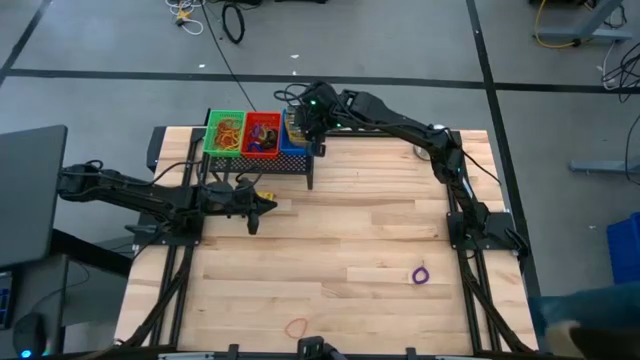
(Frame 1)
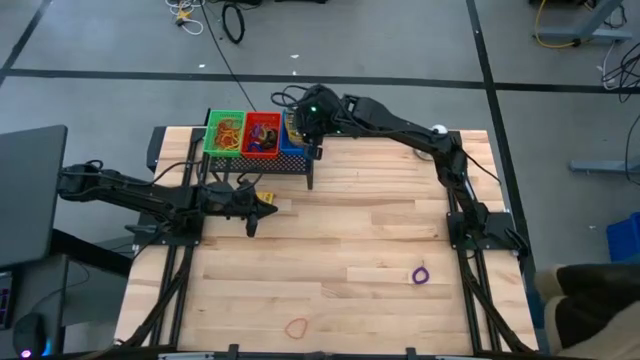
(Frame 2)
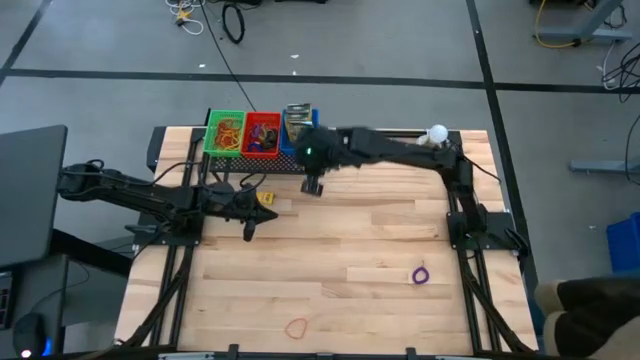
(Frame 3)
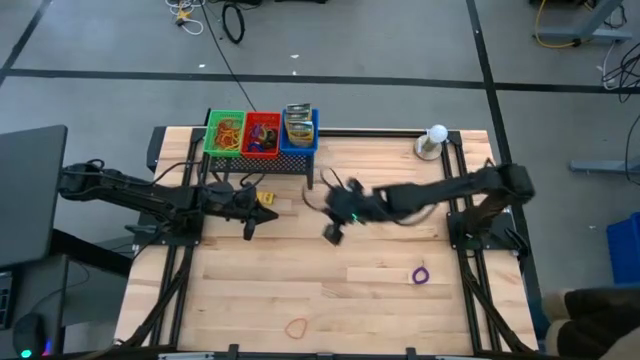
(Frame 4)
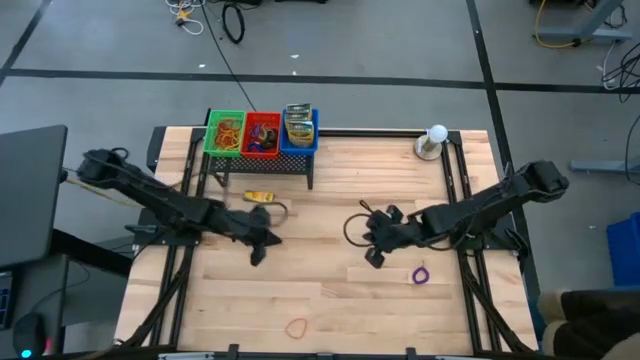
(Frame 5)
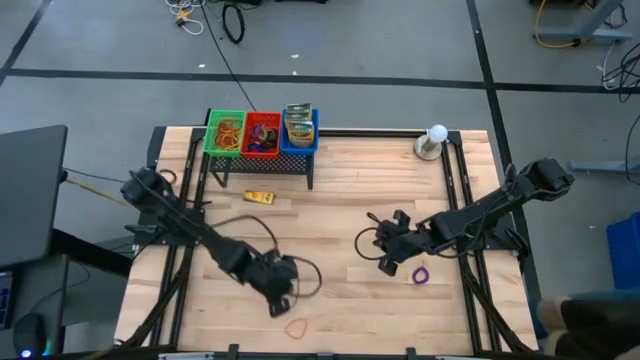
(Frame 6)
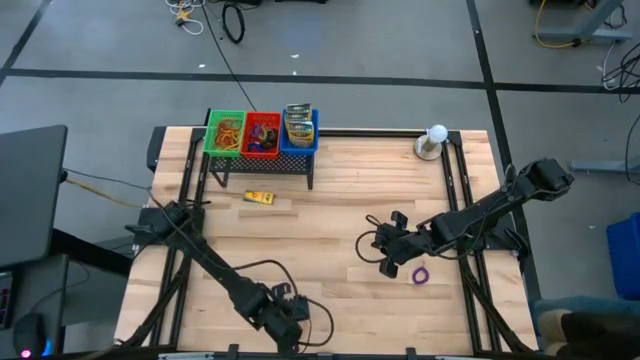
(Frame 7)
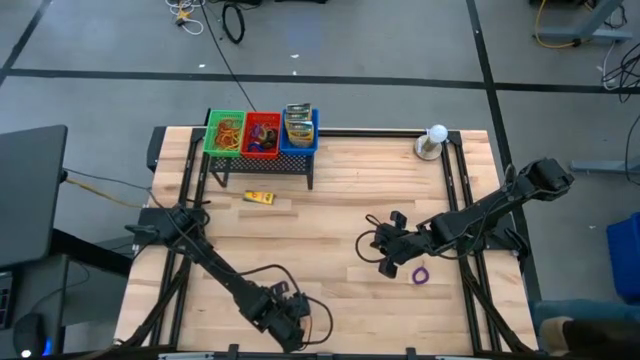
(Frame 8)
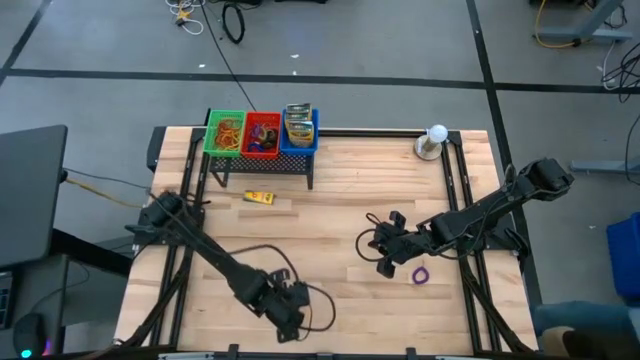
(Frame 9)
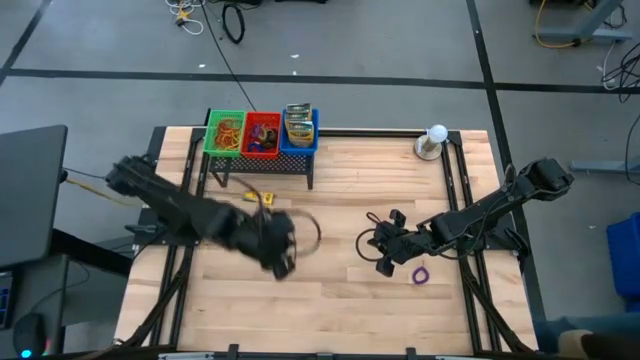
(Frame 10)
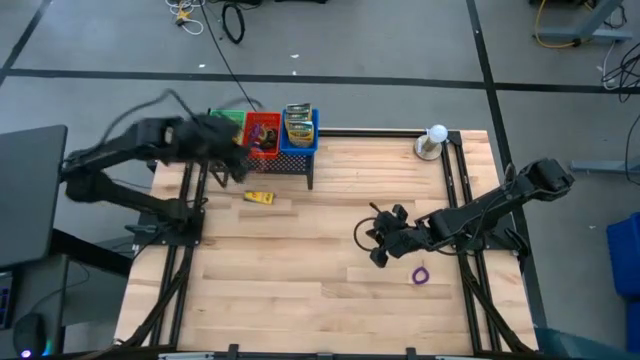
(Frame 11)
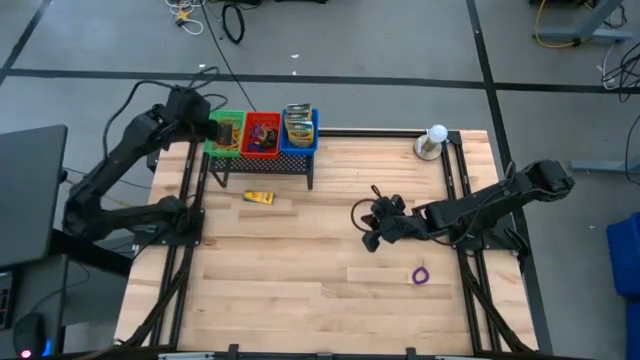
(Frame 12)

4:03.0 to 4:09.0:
Task: Pick & Place Office Desk Supplies
Put the orange rubber band into the green bin on the shelf

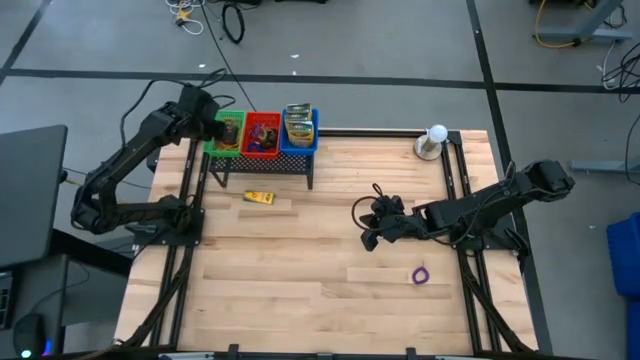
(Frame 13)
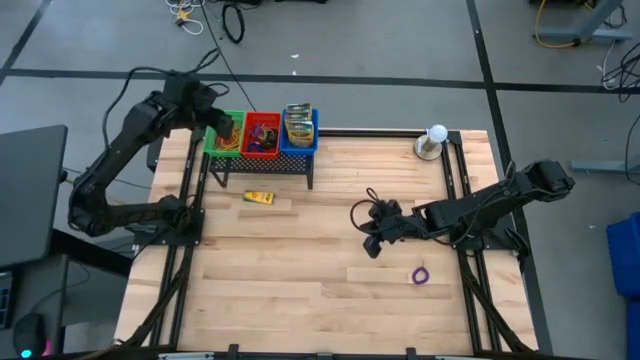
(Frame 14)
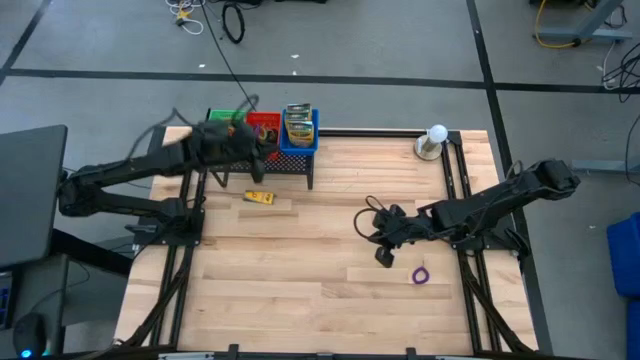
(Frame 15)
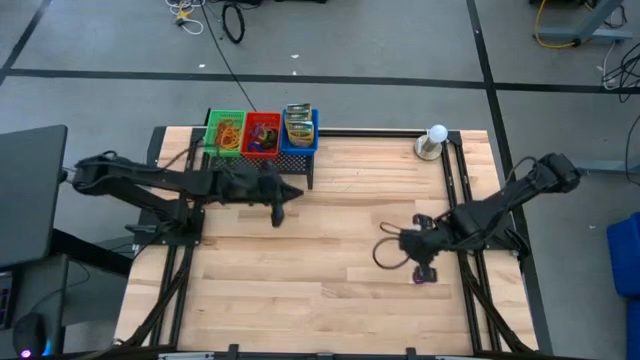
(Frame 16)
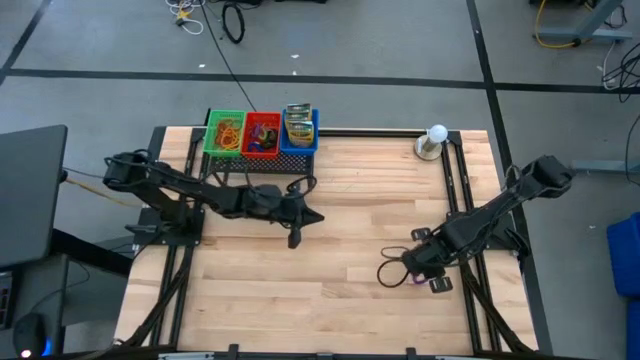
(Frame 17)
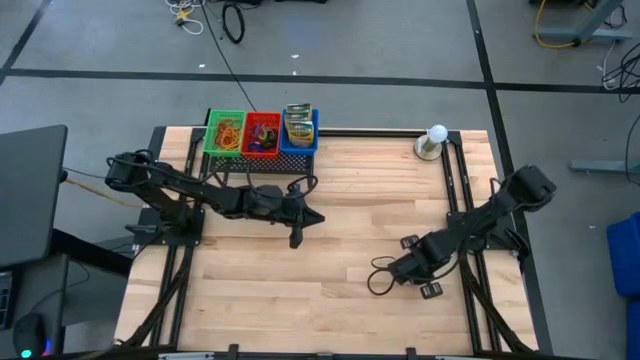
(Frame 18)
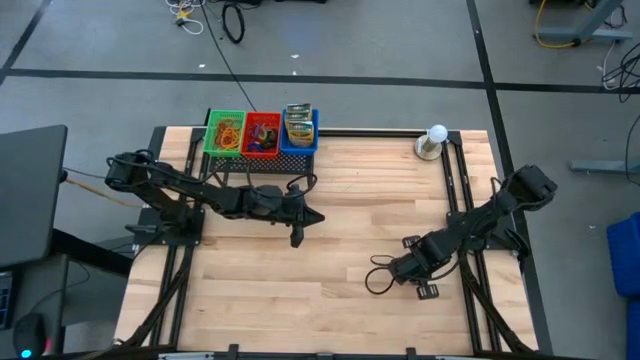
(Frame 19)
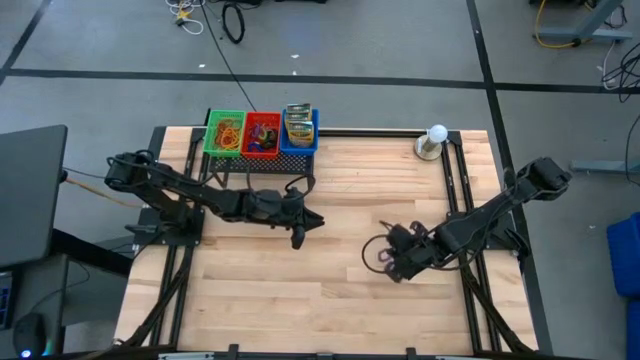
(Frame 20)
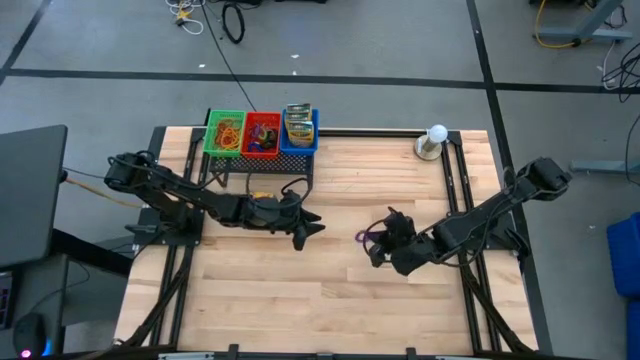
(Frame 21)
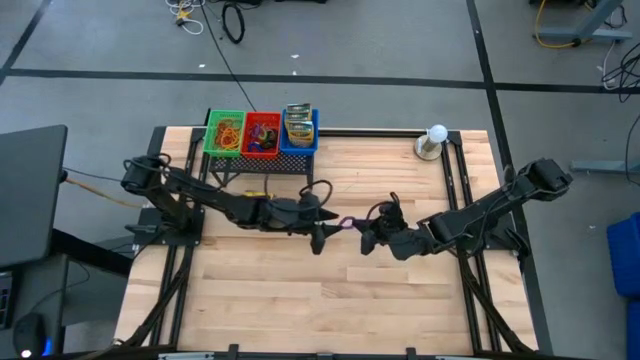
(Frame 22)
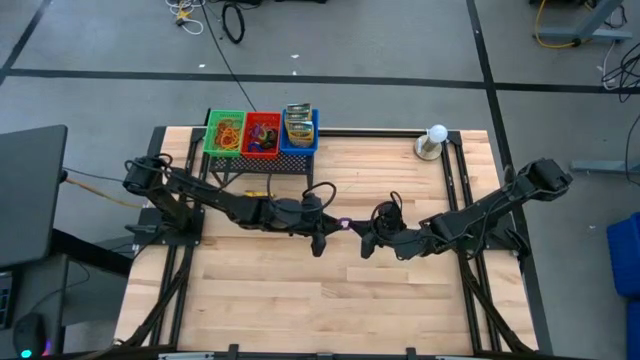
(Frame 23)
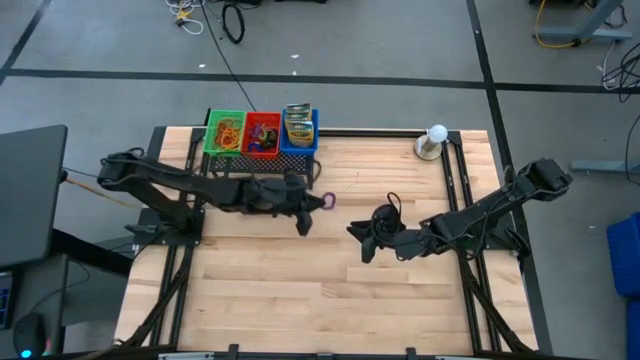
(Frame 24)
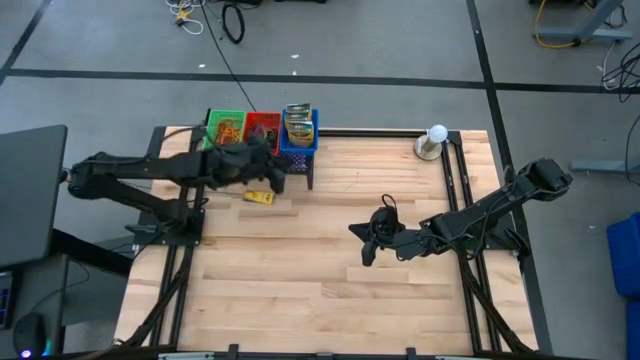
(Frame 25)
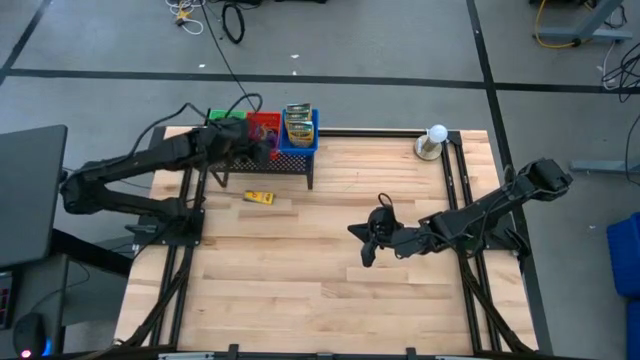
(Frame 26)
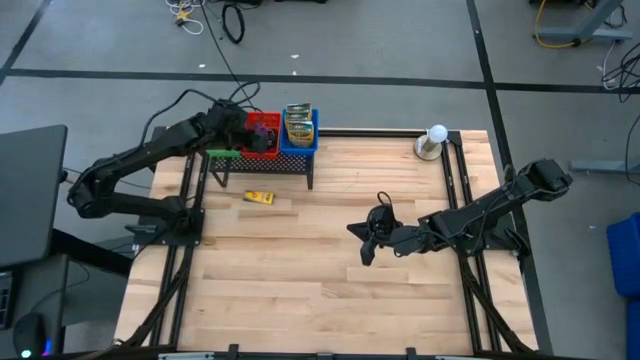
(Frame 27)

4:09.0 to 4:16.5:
Put the violet spring rubber band into the red bin on the shelf

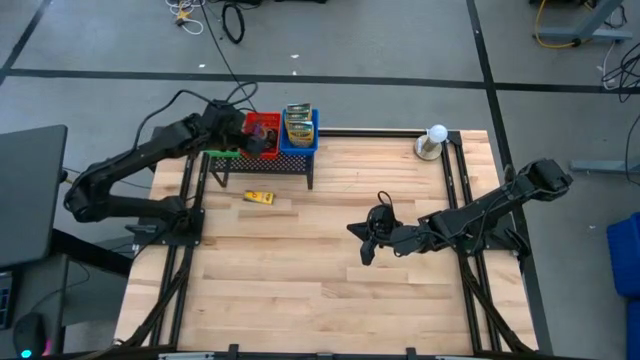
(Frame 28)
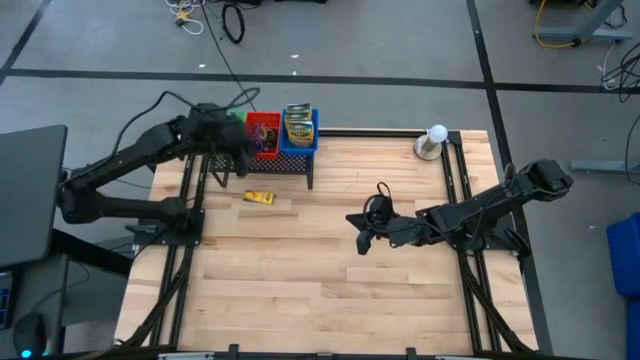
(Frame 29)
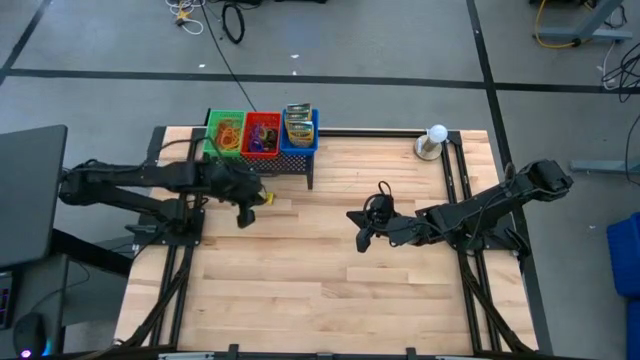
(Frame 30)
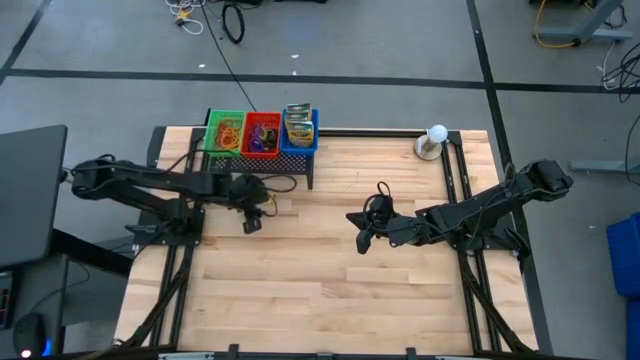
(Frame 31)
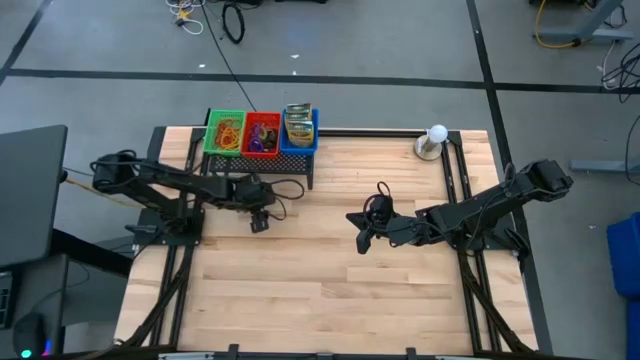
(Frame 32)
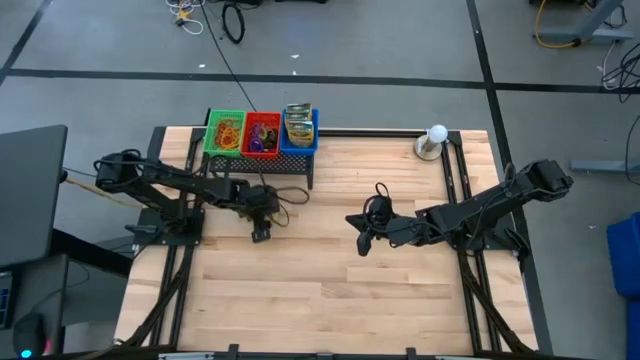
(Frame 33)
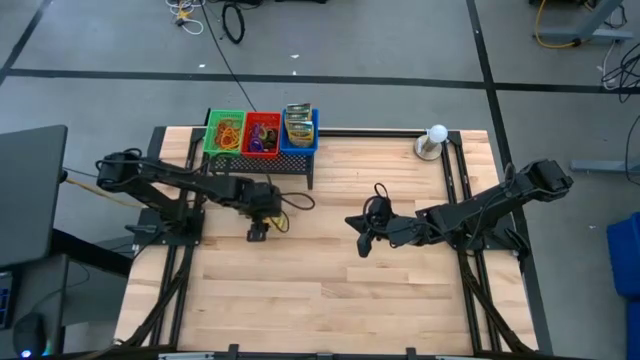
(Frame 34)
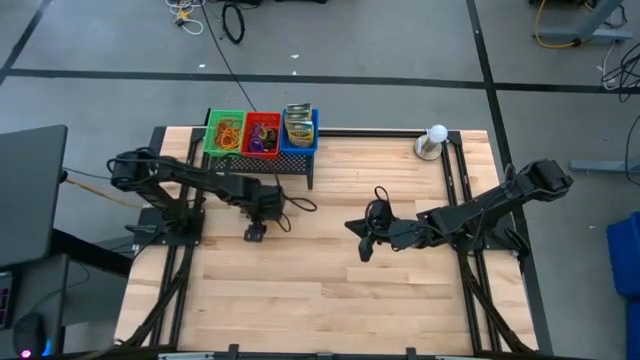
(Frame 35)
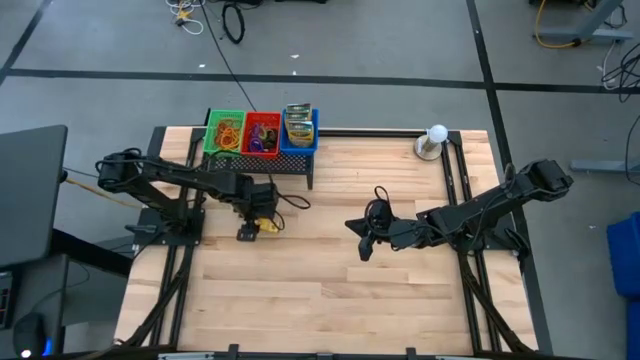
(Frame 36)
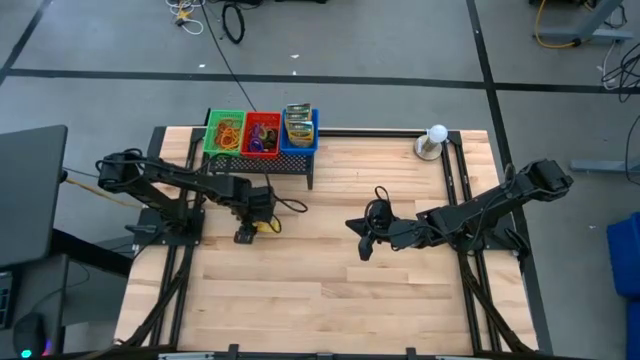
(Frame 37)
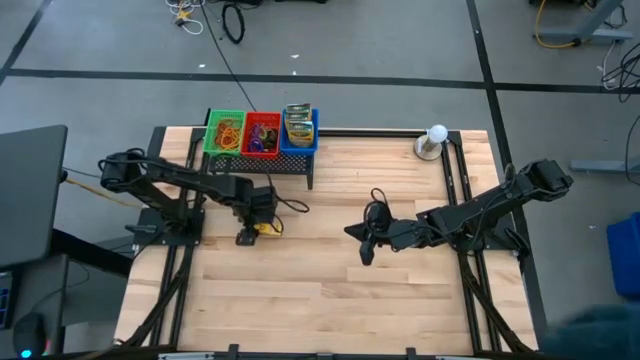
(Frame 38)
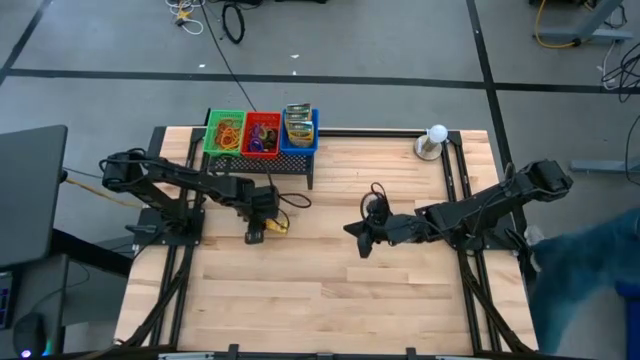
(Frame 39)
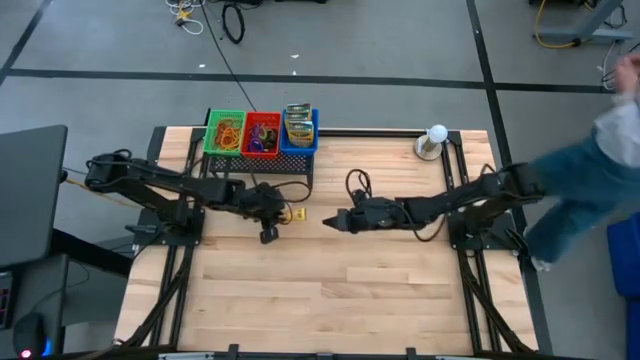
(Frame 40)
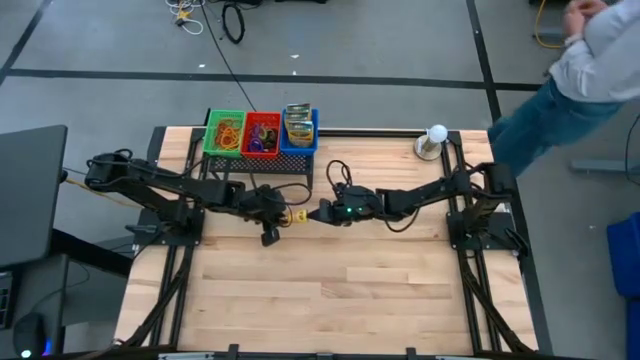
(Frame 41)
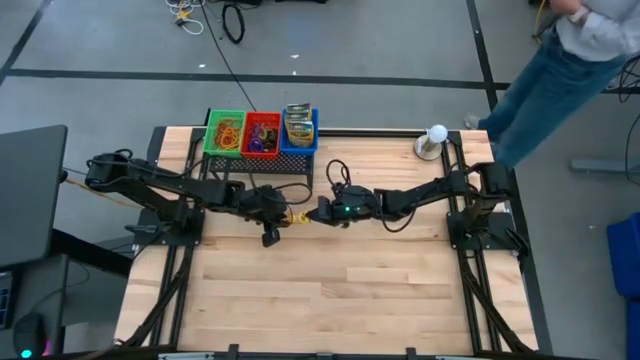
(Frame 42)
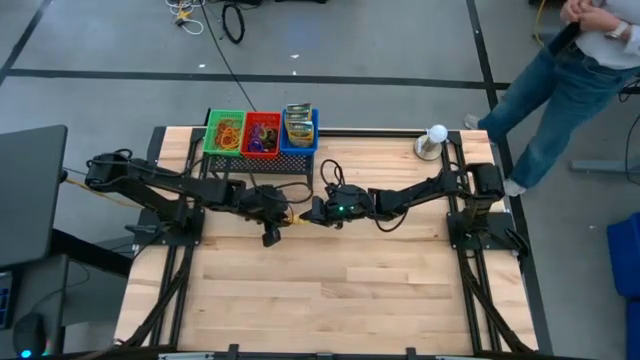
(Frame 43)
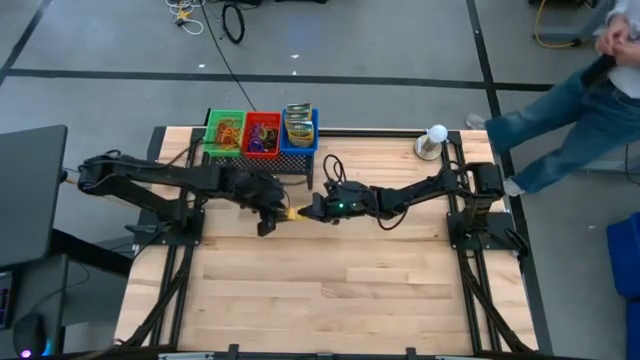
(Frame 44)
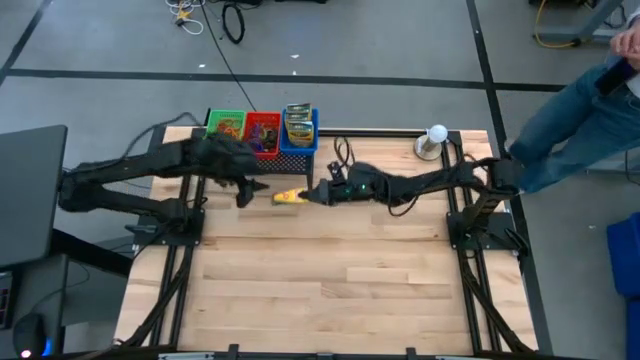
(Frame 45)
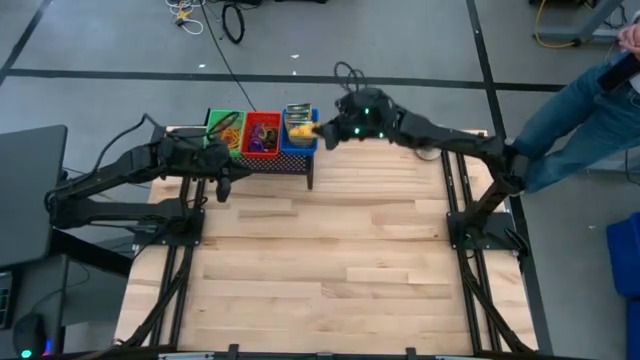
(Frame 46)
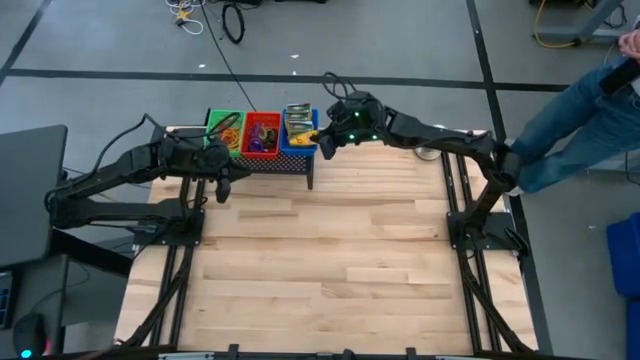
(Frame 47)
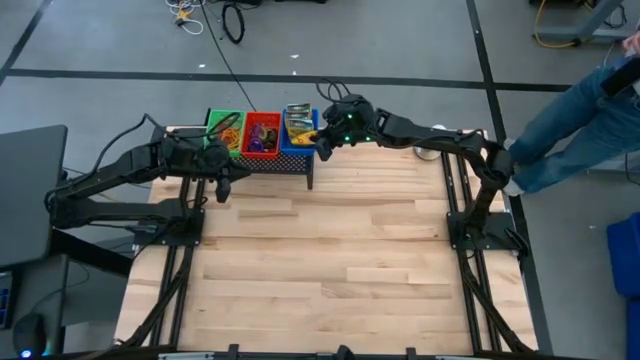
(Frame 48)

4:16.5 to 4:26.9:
Put the small box of crayons into the blue bin on the shelf
